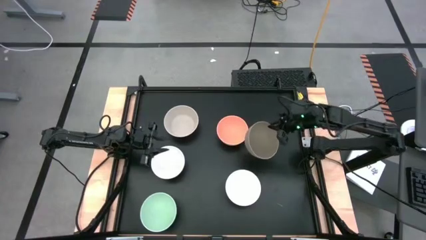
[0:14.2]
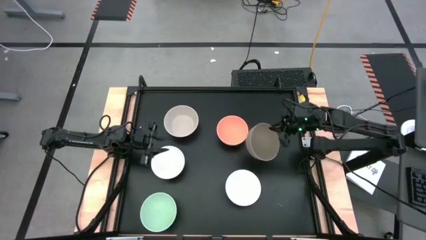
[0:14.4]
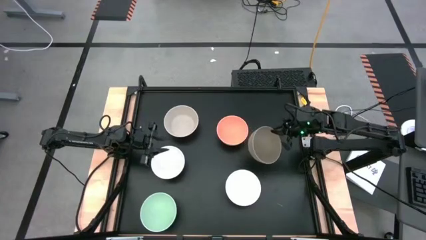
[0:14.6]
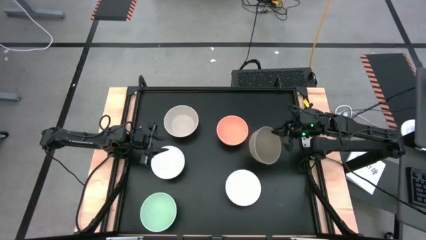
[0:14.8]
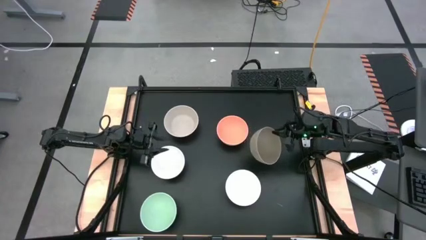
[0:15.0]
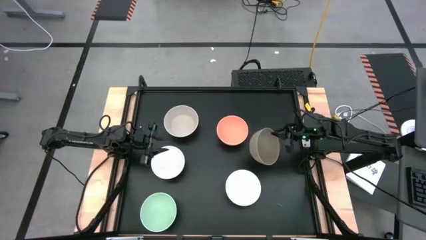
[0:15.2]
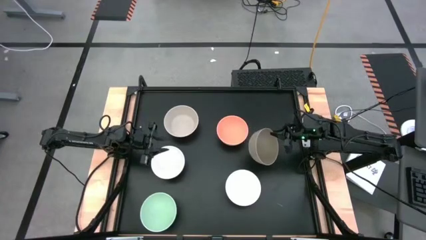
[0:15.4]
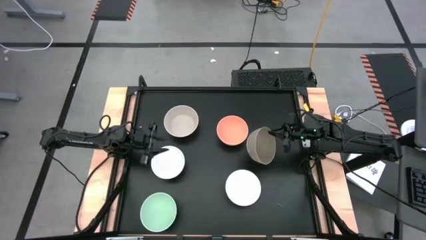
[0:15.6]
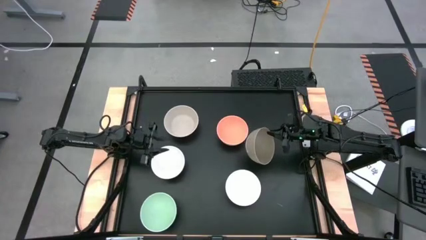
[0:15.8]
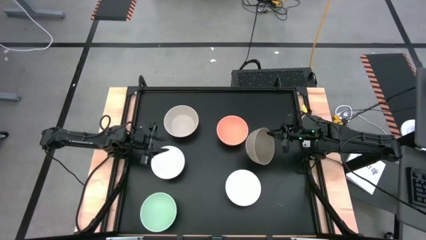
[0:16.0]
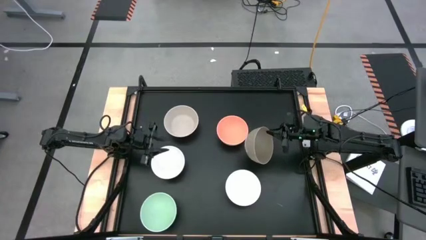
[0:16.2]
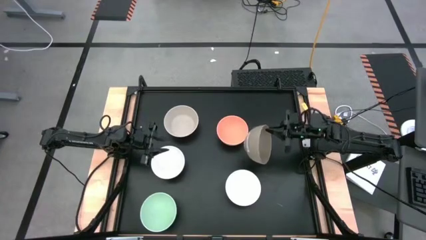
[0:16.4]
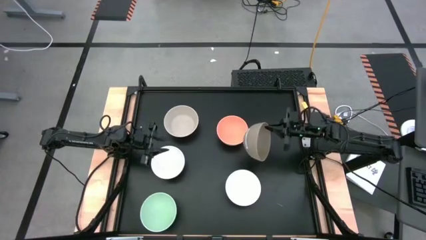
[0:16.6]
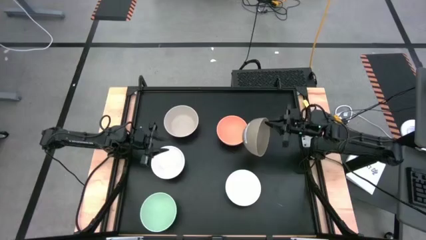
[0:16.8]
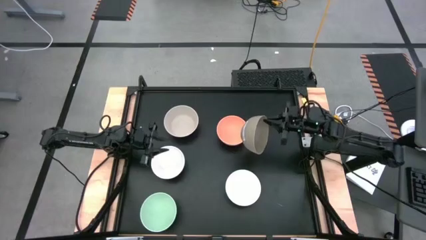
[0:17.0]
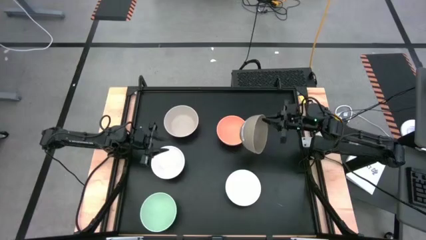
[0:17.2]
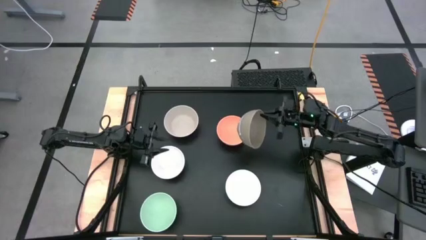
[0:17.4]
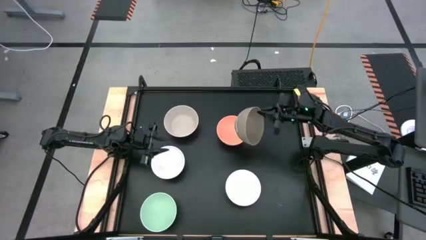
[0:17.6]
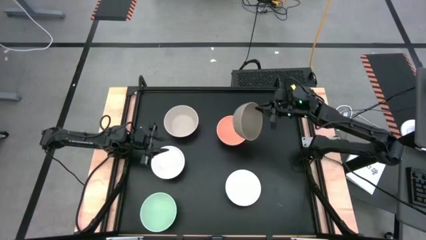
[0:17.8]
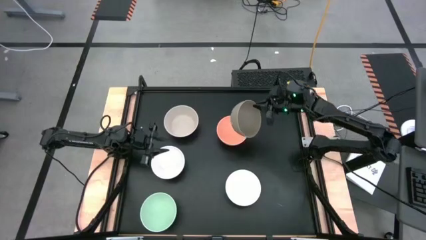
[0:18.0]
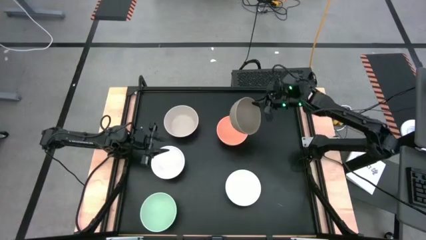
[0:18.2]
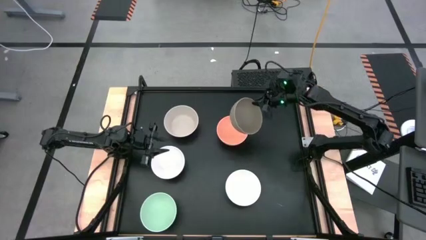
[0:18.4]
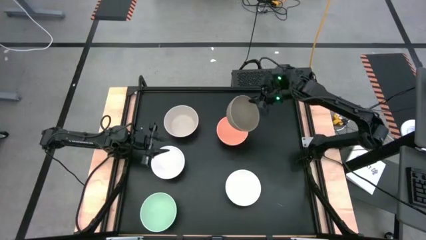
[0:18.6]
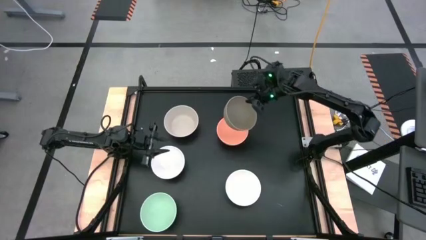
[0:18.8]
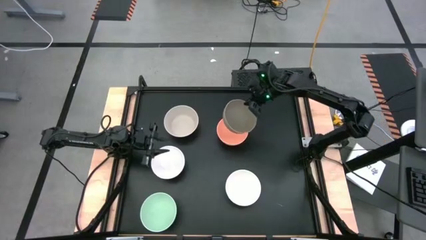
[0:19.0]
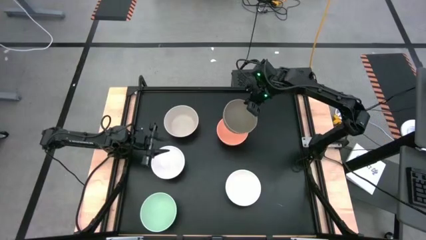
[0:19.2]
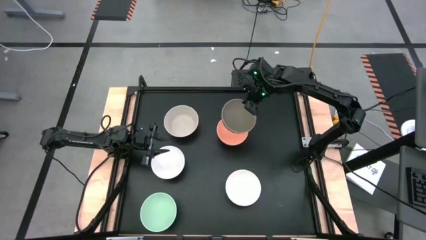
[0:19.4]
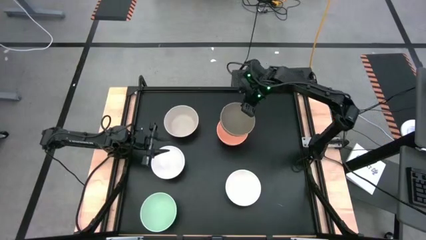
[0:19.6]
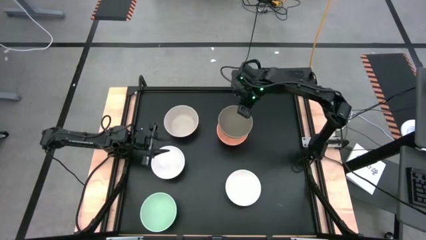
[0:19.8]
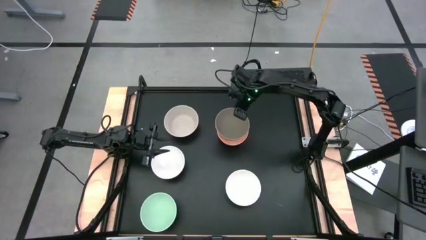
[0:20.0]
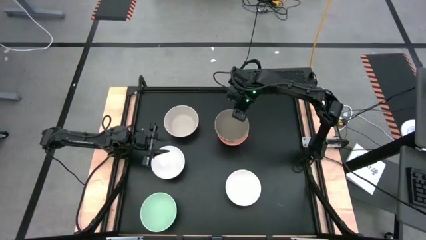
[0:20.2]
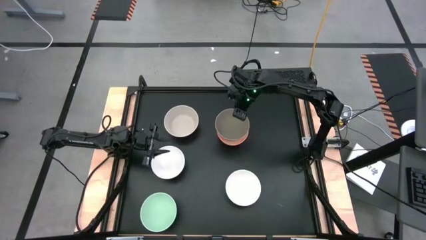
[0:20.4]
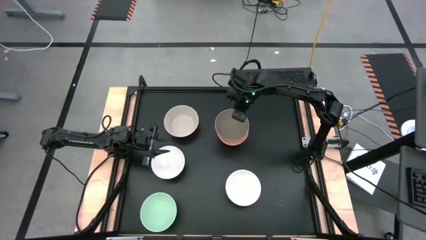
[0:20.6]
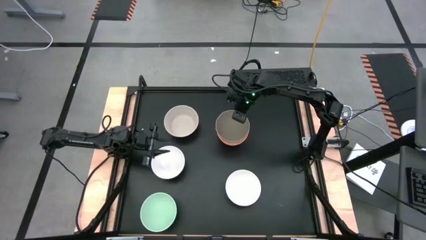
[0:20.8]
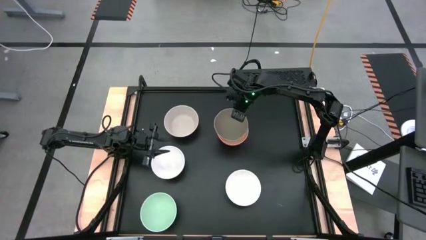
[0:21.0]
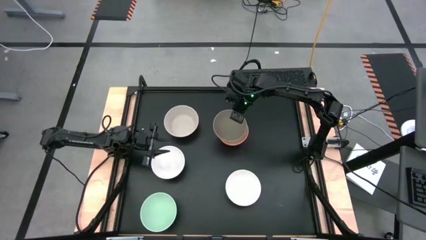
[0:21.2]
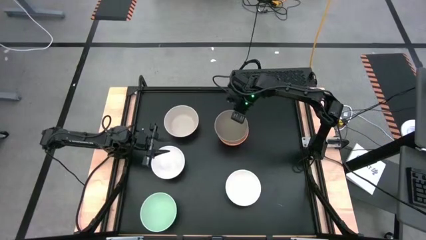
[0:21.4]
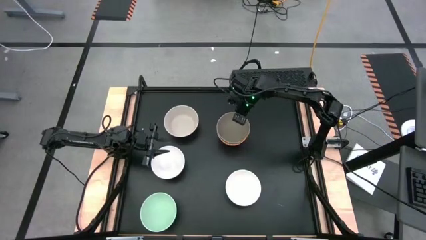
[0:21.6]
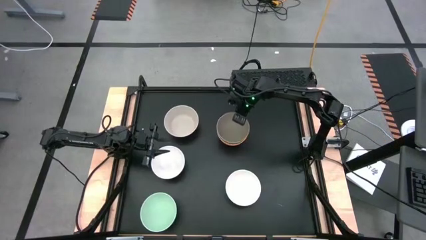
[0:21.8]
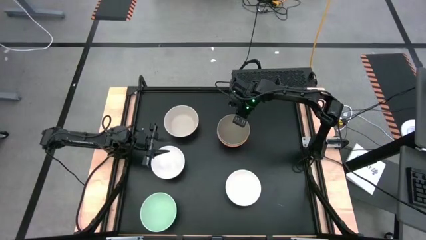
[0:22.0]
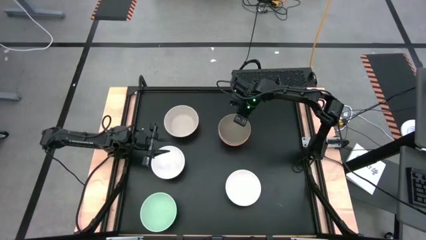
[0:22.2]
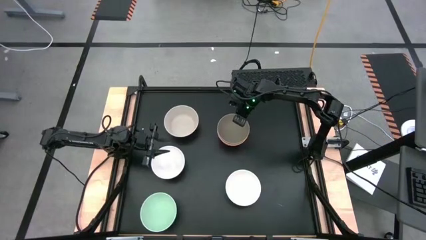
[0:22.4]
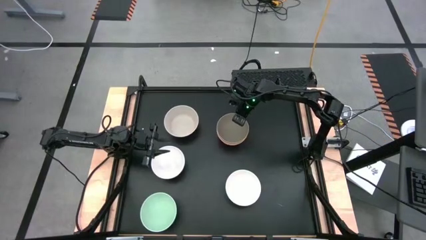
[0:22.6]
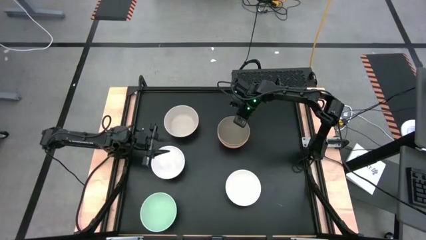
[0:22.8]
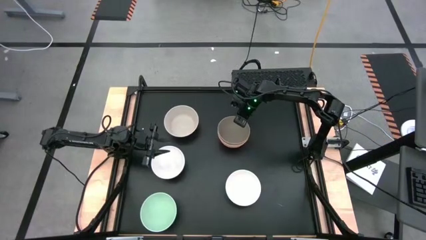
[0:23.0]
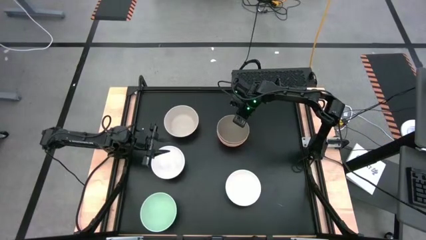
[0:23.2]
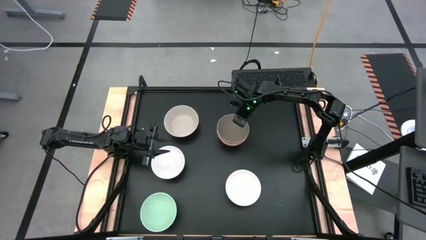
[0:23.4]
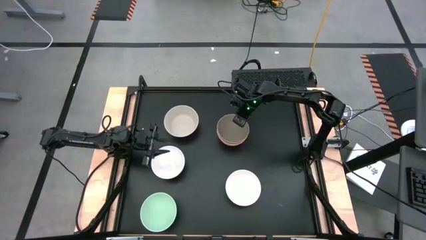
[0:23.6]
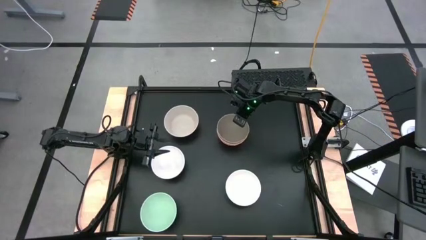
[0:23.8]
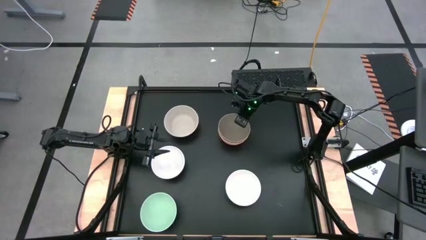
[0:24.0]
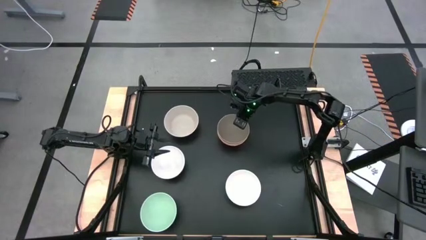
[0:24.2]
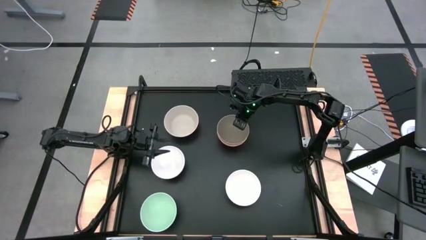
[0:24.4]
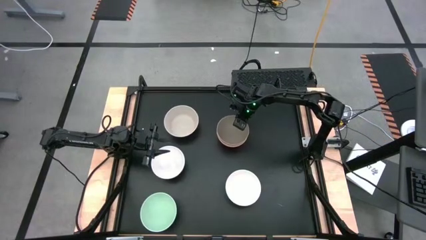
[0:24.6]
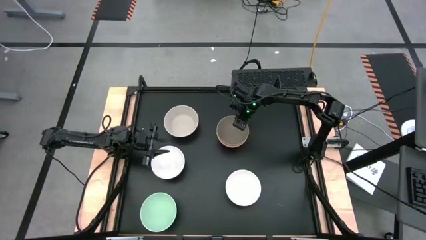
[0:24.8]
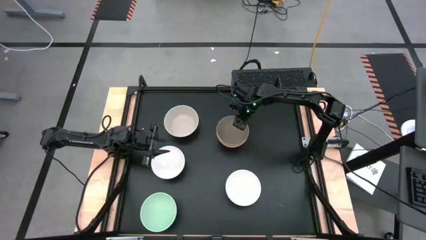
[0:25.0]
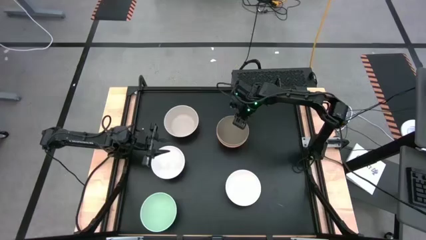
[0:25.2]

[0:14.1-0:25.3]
Task: Nest bowls inside each other
Stack the brown bowl on top of the orange bowl

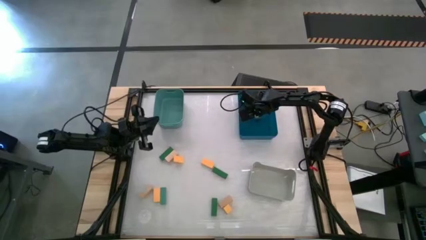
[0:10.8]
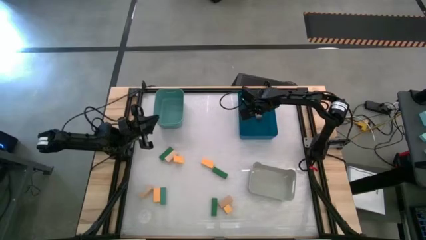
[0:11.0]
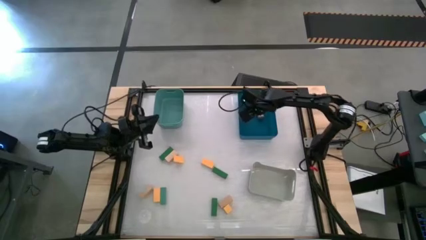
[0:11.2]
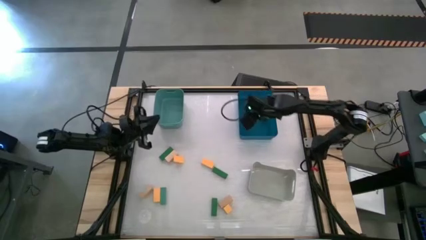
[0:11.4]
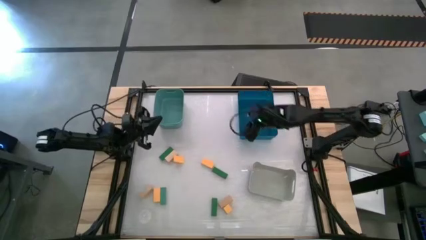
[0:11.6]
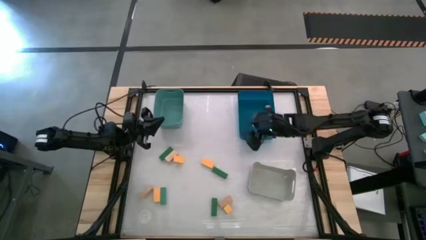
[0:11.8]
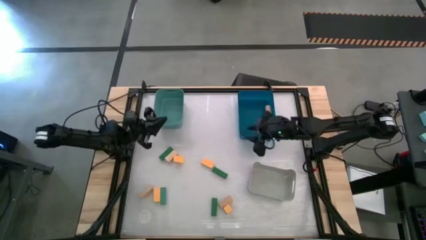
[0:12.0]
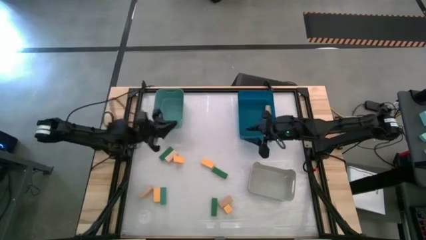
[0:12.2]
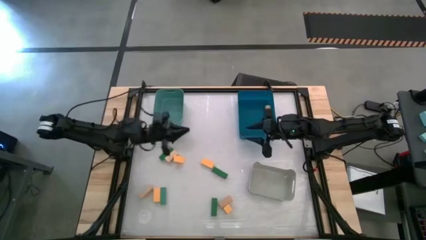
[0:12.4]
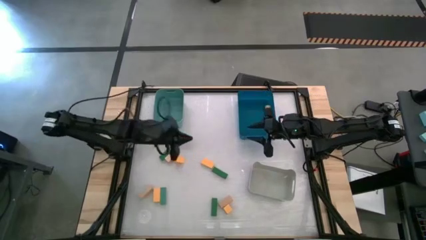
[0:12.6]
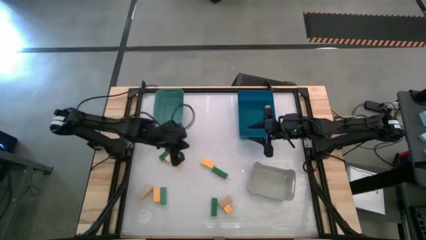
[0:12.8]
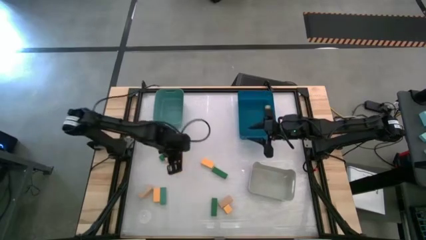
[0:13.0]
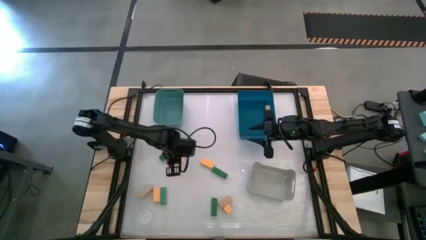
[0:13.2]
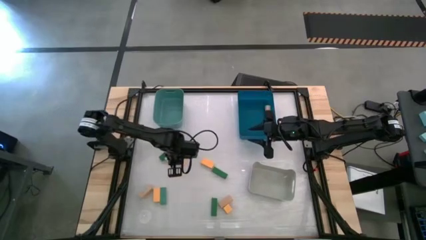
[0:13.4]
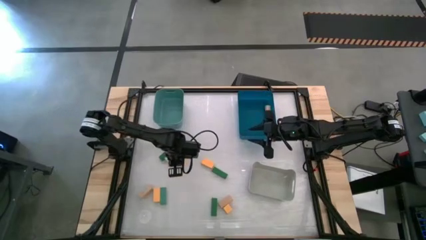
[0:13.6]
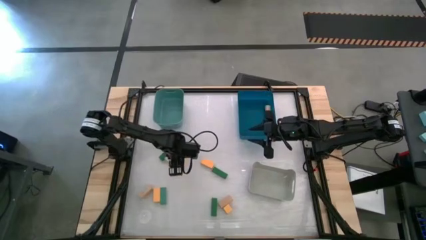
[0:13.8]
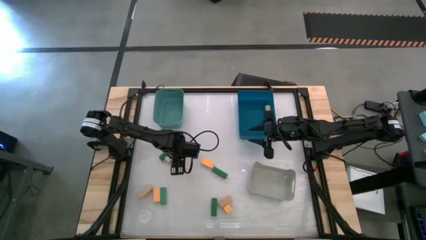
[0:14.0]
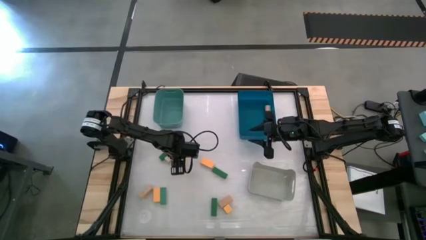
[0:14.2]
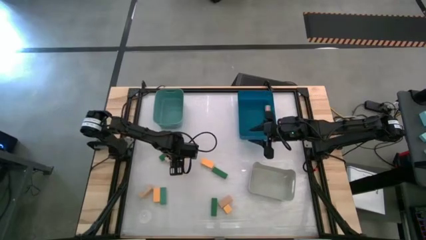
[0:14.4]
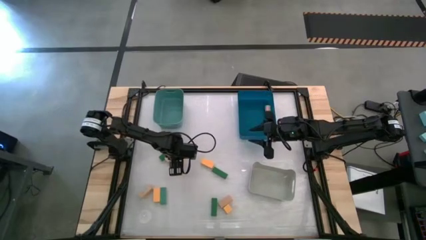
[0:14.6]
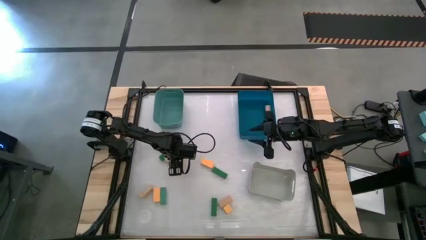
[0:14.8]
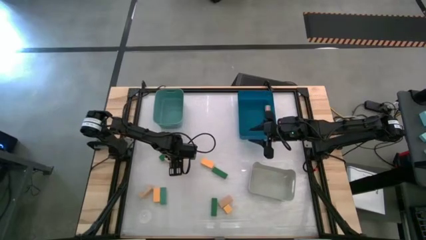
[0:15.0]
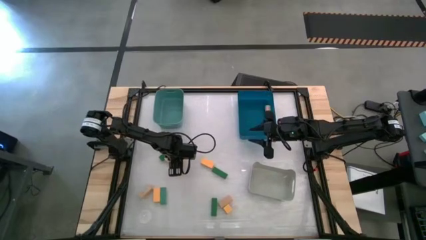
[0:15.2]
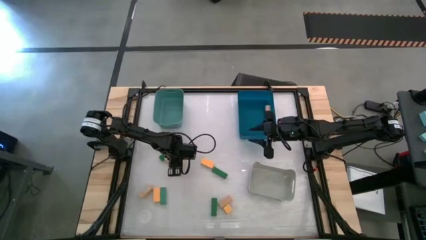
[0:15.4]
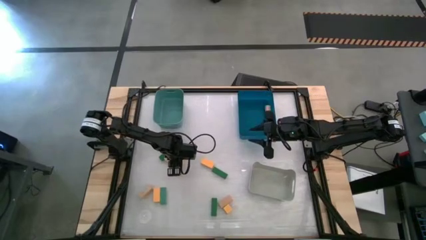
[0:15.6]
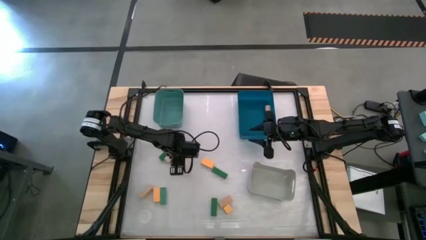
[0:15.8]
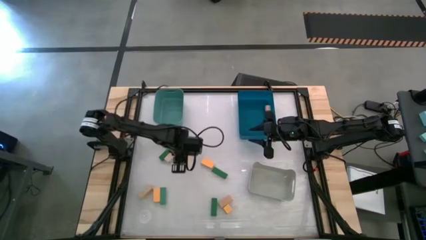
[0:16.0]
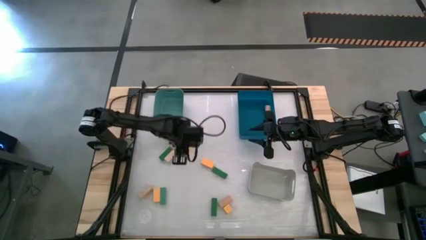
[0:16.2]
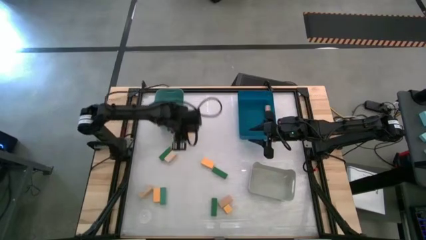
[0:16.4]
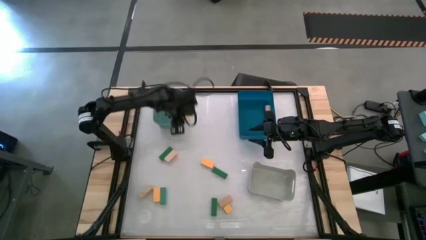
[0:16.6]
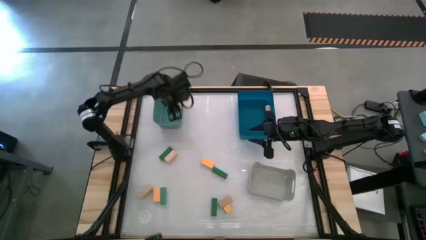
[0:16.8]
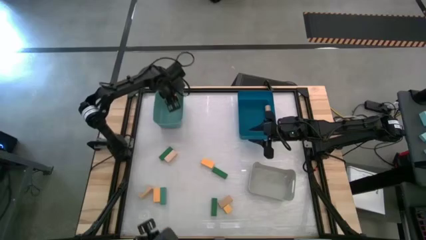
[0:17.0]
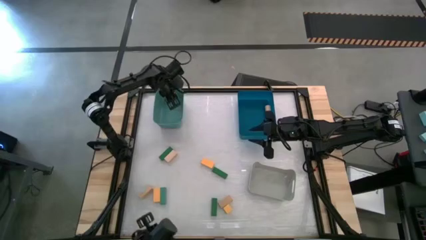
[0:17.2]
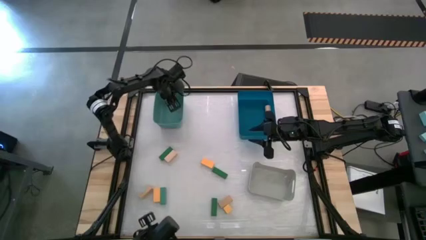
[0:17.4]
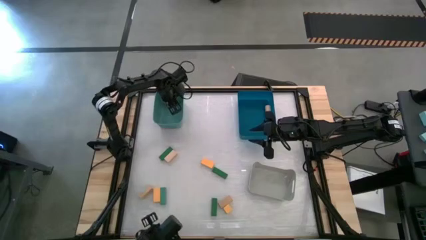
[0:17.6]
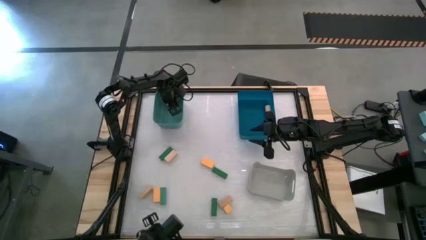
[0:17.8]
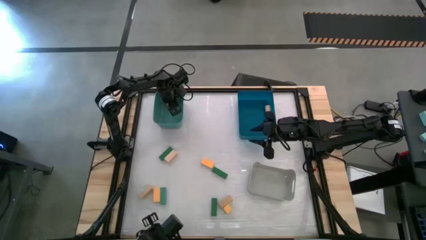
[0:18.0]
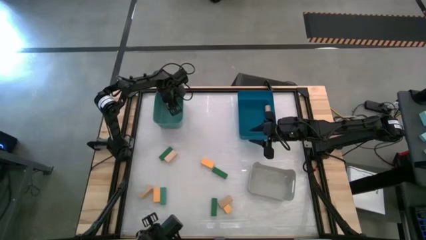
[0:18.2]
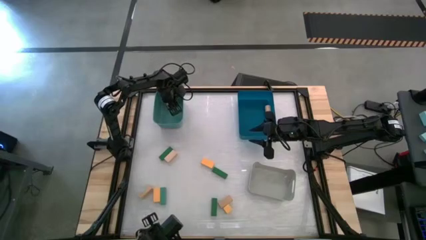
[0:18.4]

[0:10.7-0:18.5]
Task: Sort & place blocks by color
Put the yellow wooden block into the light blue bin
